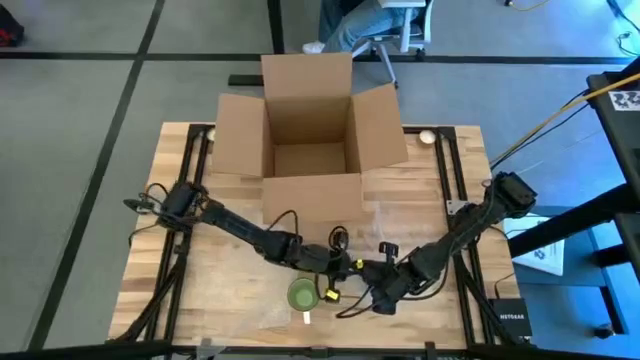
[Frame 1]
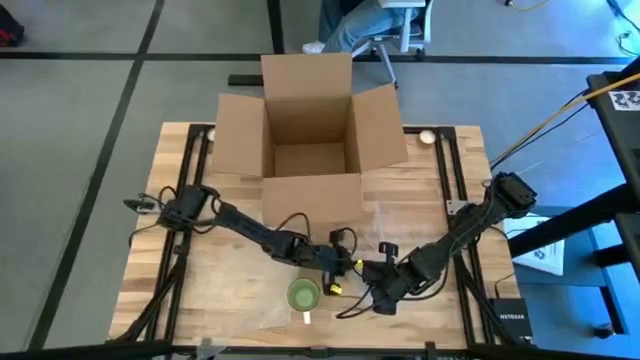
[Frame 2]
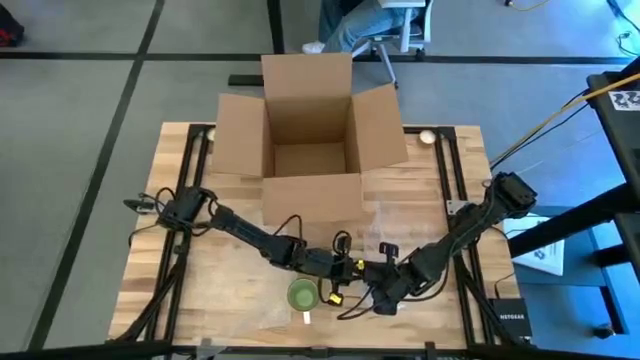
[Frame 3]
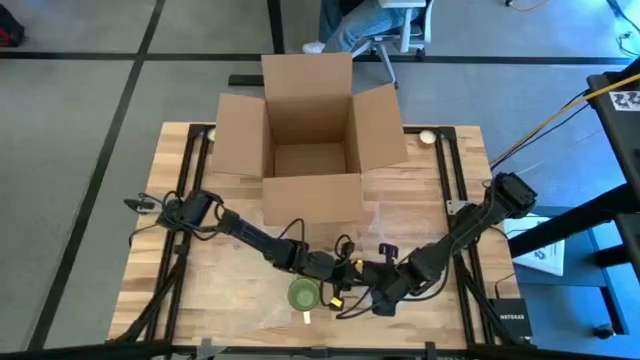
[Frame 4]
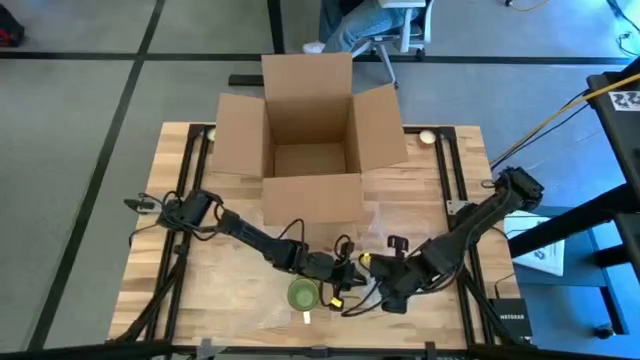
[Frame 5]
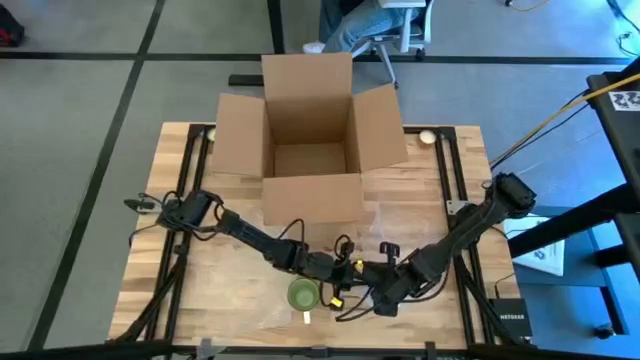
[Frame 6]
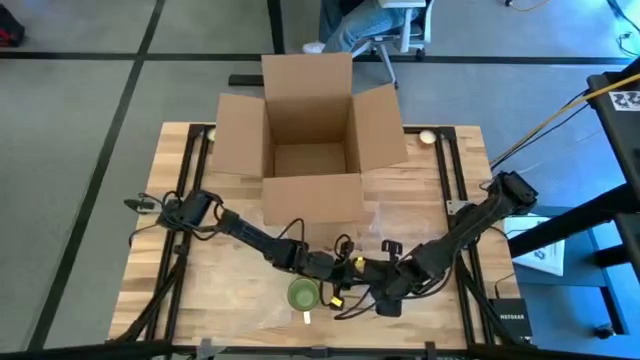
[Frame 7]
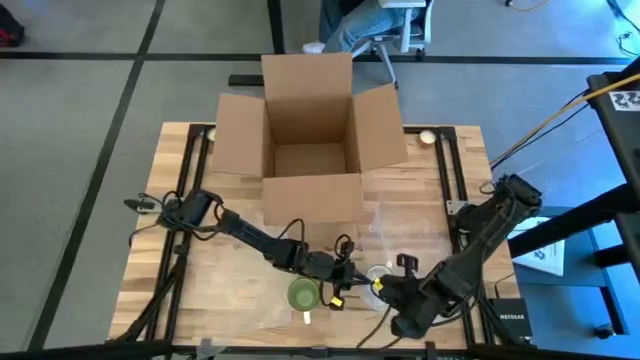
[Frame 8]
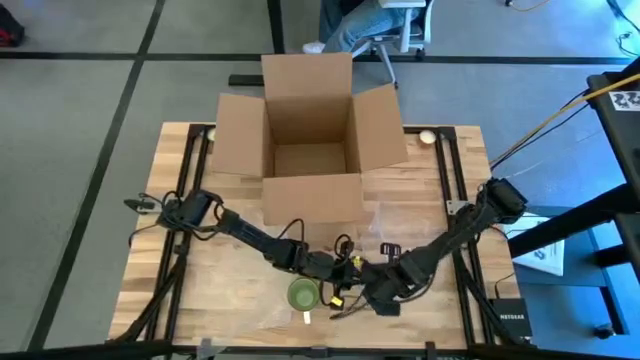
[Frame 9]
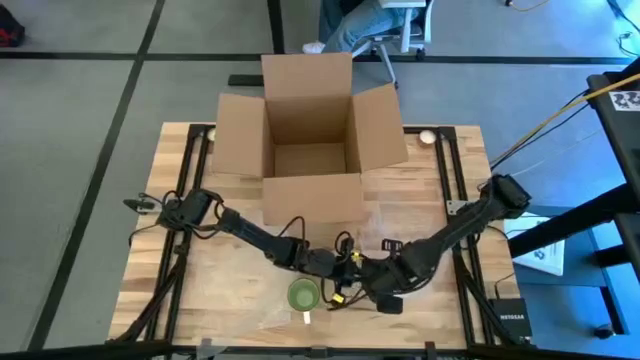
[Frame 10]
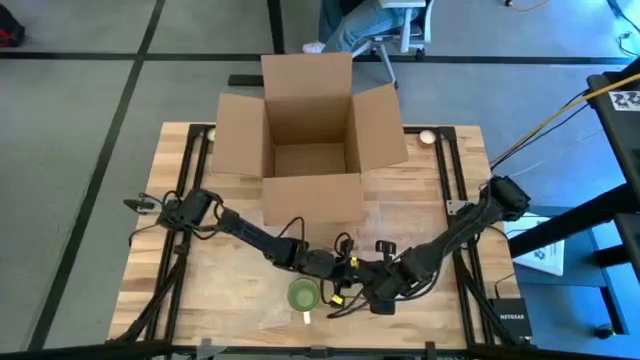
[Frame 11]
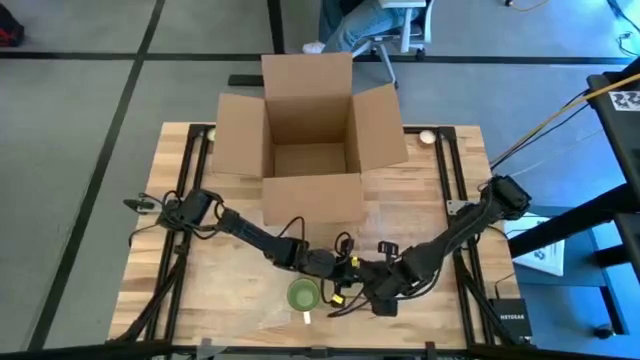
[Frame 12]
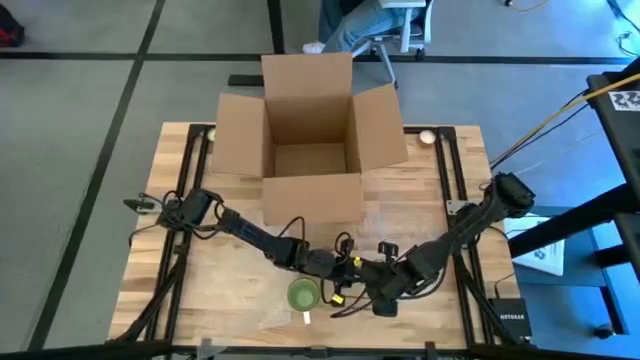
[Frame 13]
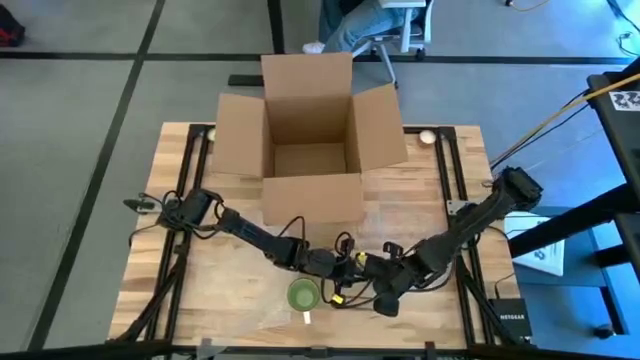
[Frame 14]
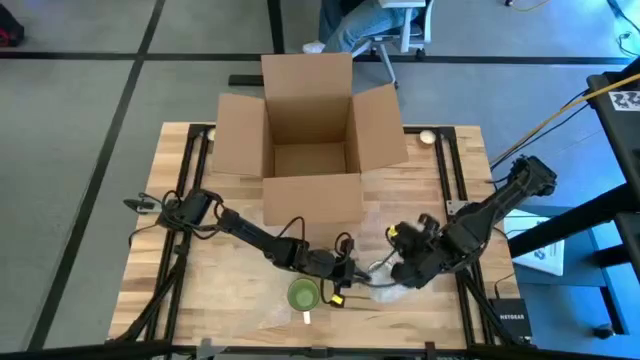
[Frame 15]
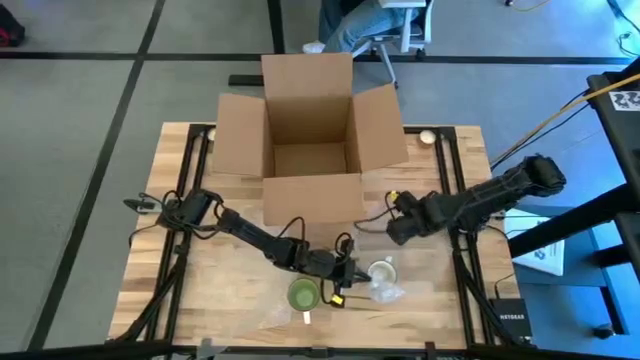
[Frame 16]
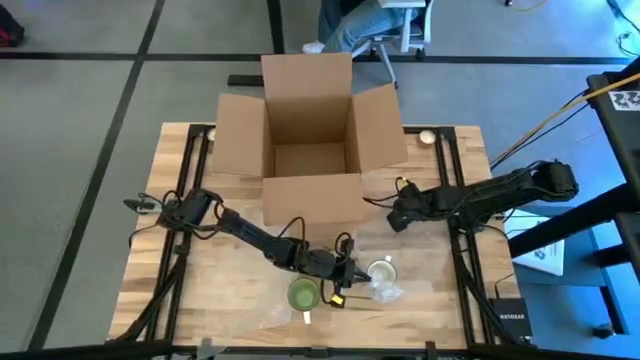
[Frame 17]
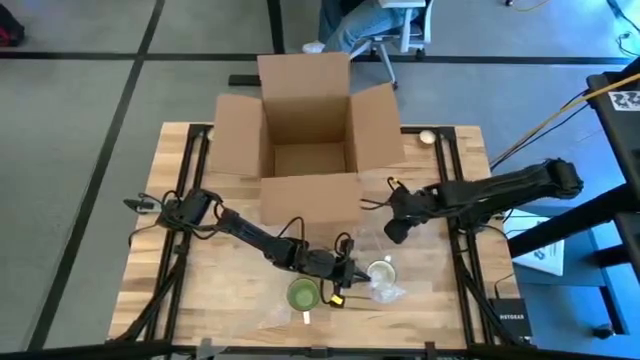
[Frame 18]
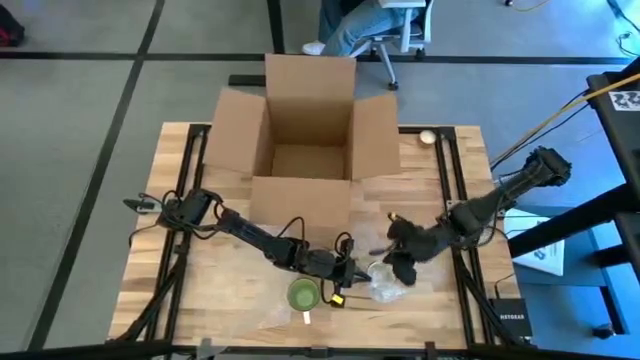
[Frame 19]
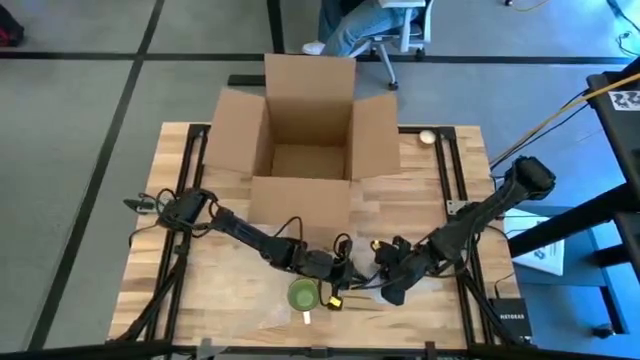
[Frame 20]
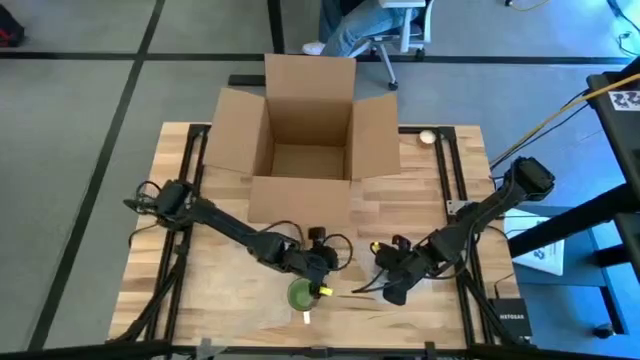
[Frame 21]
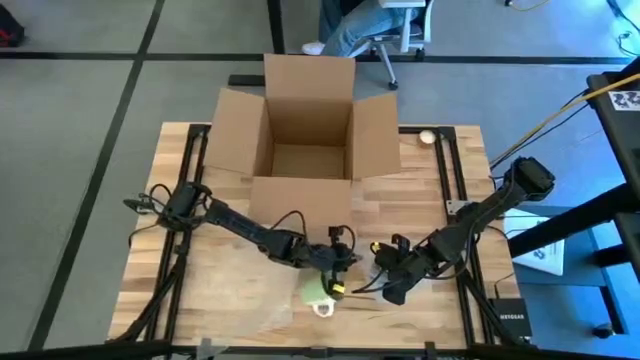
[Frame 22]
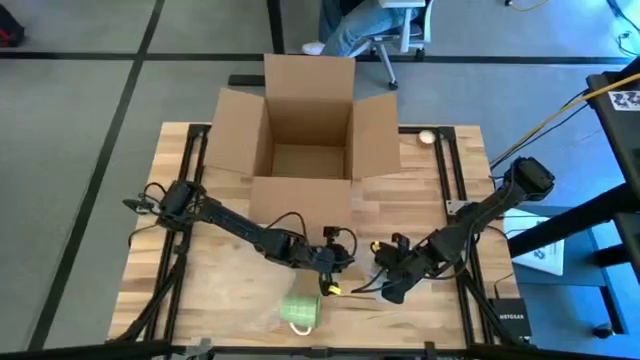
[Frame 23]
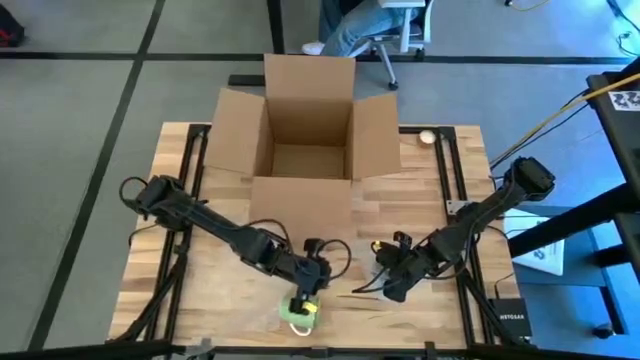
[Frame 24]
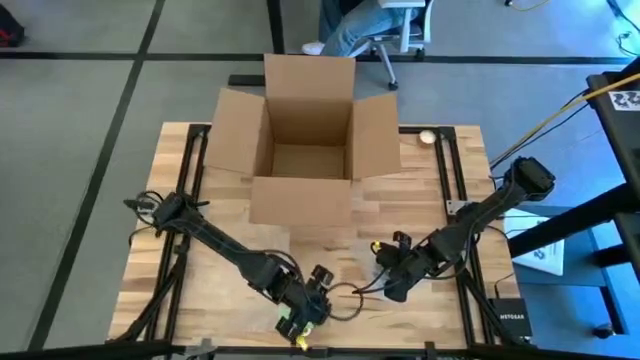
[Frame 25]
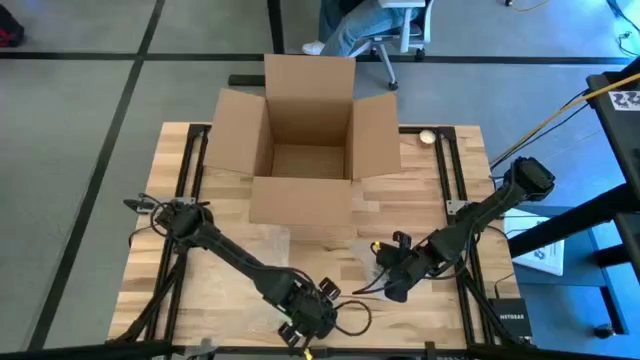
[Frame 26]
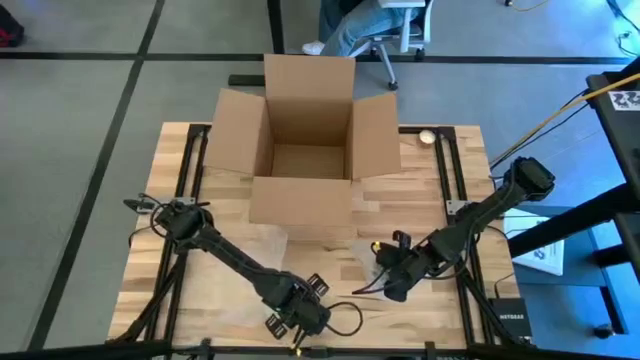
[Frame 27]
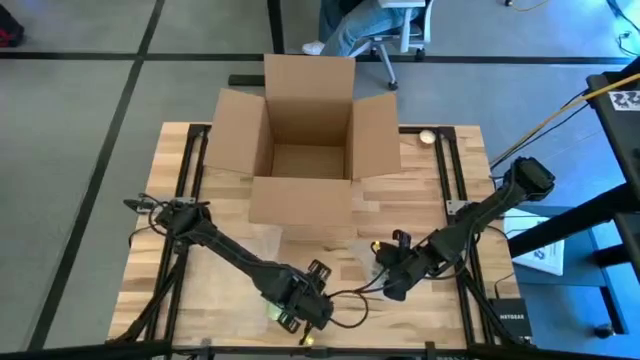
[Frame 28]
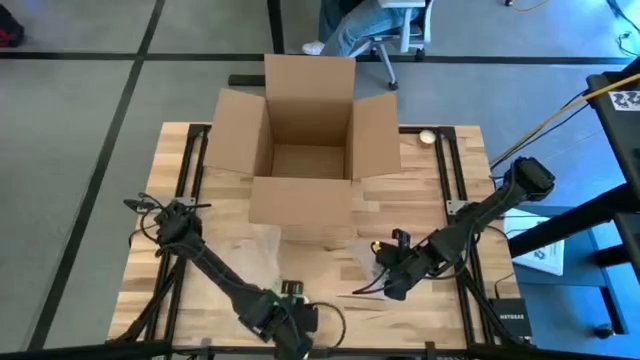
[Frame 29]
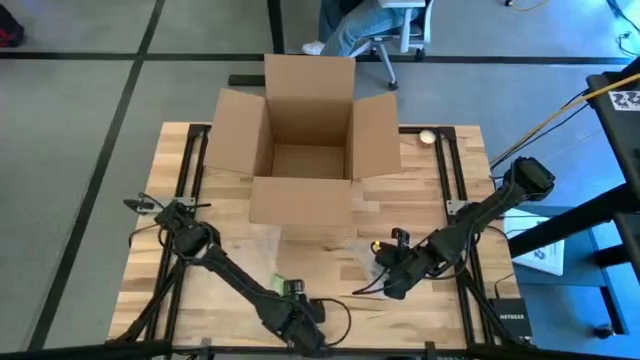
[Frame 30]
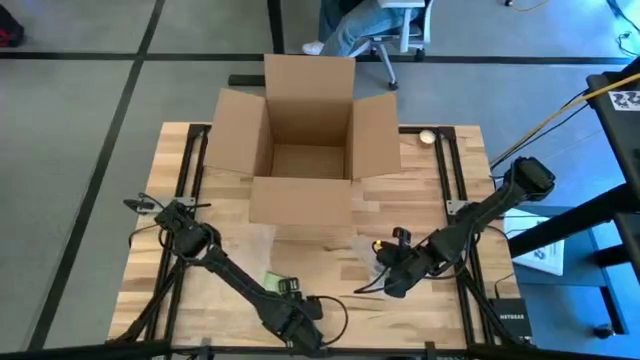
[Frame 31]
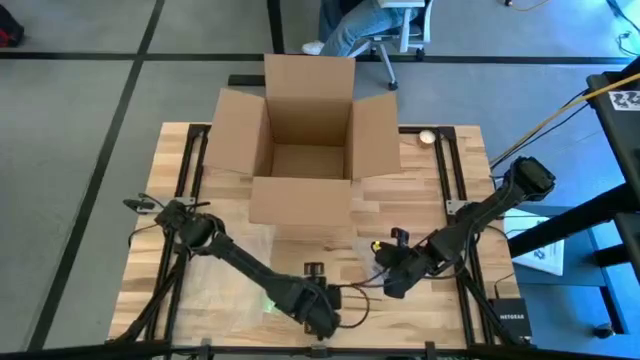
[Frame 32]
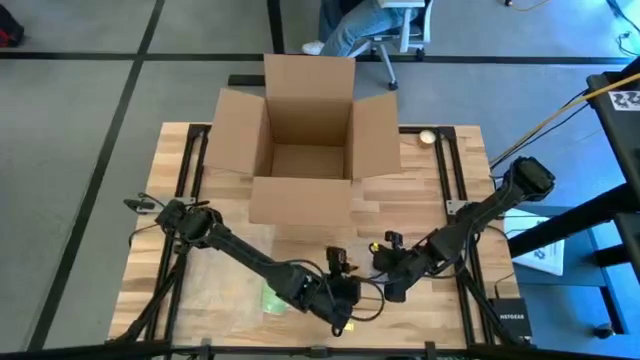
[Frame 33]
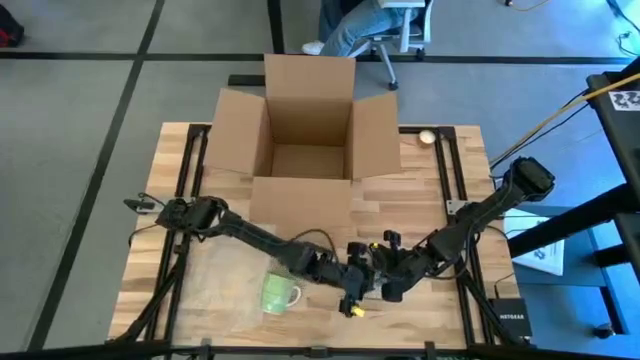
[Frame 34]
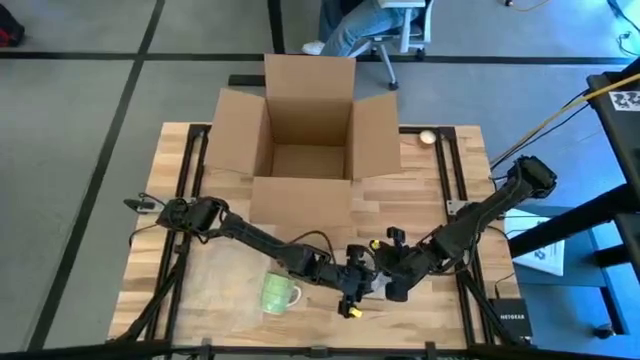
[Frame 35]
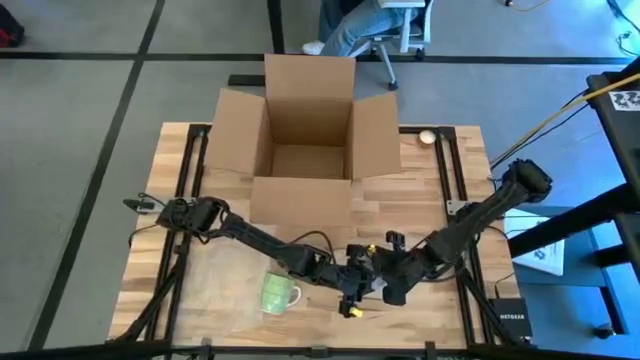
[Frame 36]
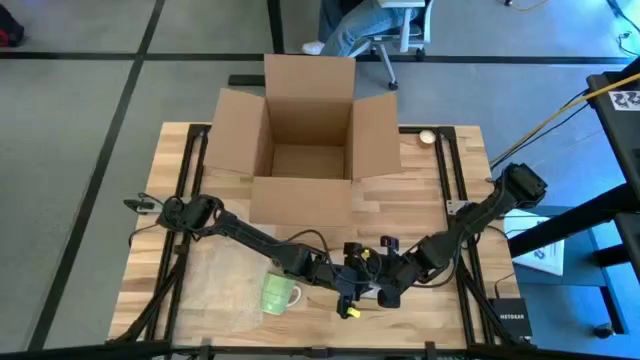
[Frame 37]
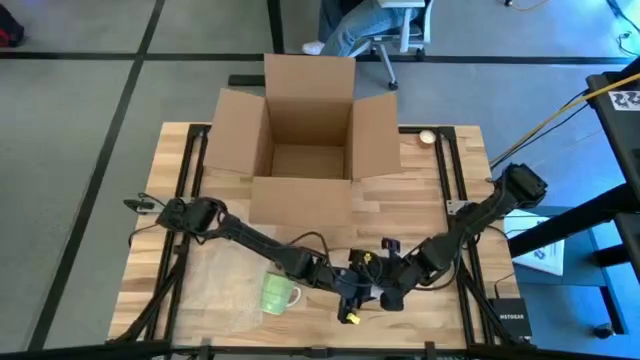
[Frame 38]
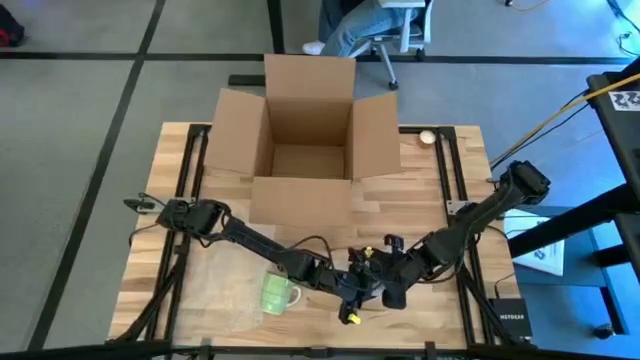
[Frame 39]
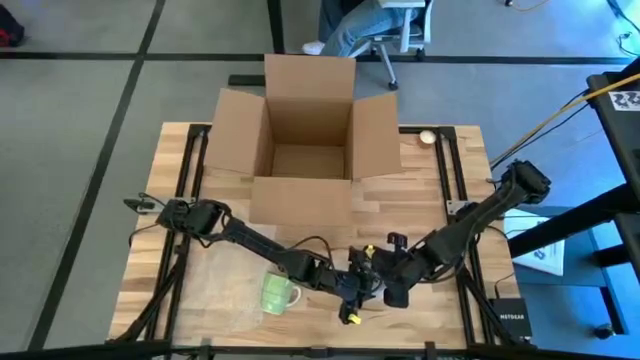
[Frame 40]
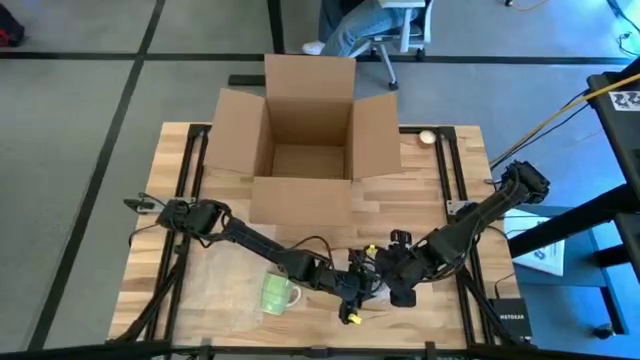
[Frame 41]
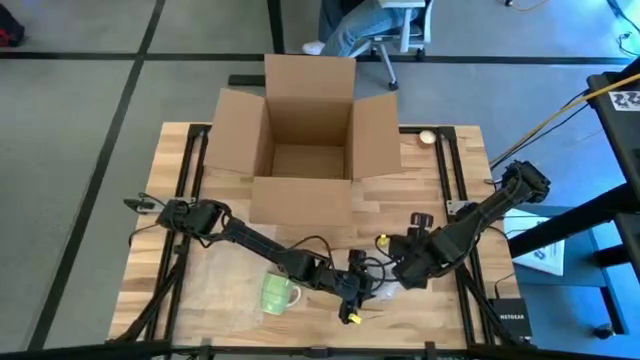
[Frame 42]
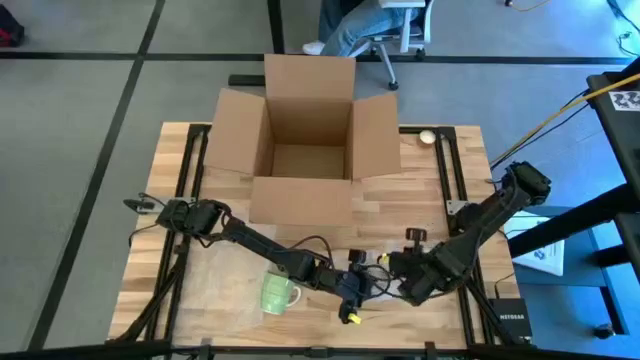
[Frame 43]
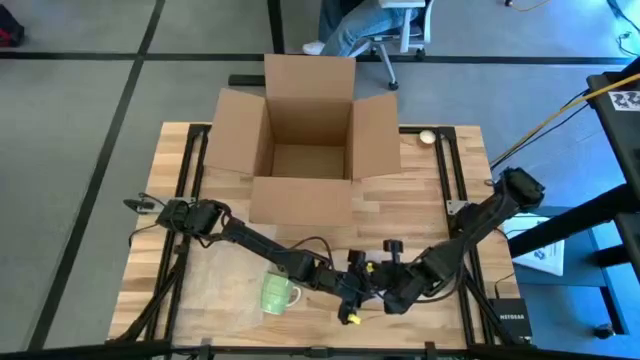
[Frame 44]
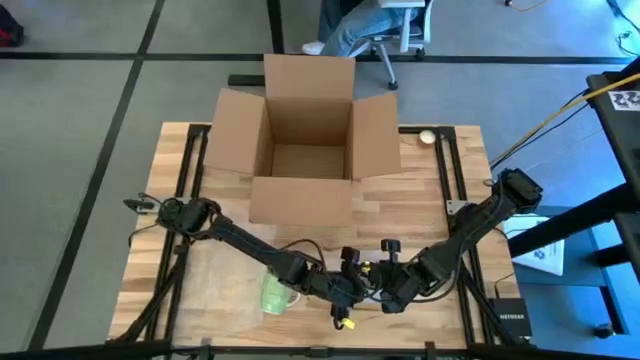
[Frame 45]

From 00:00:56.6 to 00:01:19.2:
Task: wrap mug
Wrap the blue mug with the right transparent bubble wrap
